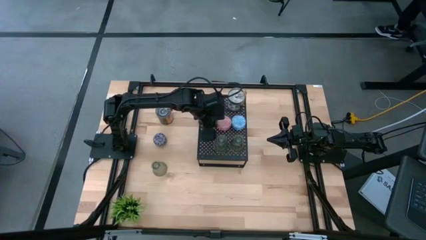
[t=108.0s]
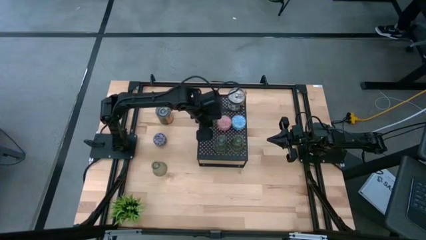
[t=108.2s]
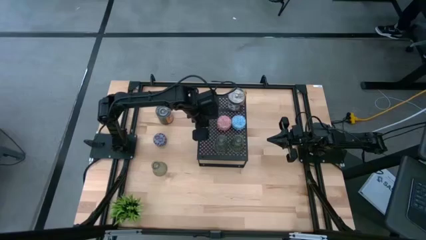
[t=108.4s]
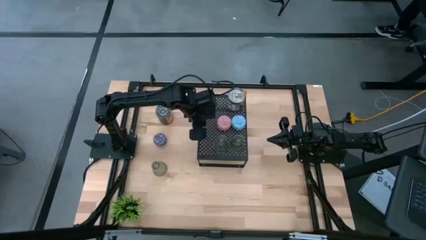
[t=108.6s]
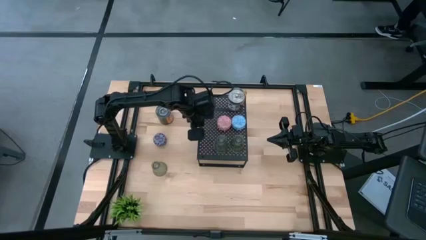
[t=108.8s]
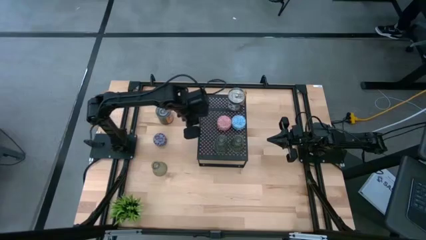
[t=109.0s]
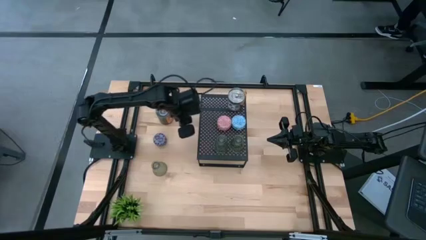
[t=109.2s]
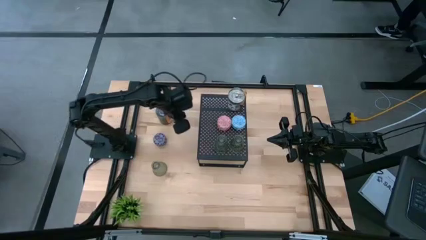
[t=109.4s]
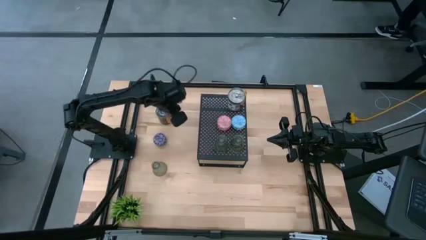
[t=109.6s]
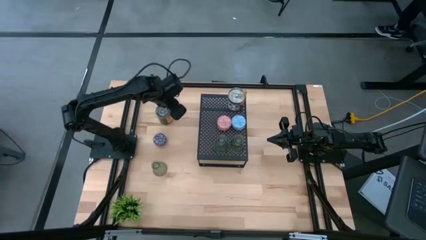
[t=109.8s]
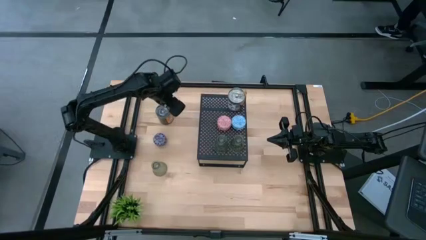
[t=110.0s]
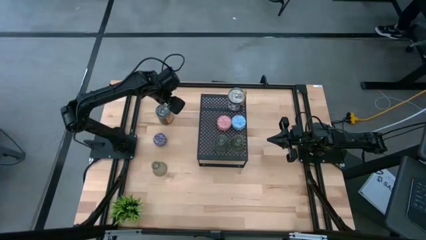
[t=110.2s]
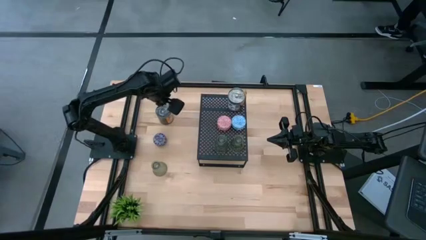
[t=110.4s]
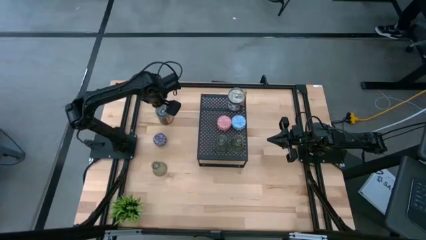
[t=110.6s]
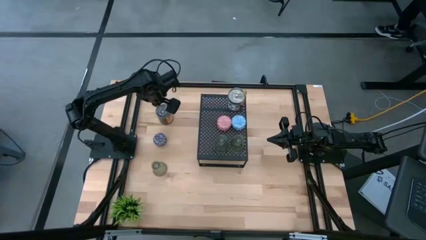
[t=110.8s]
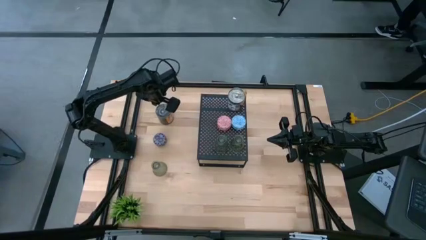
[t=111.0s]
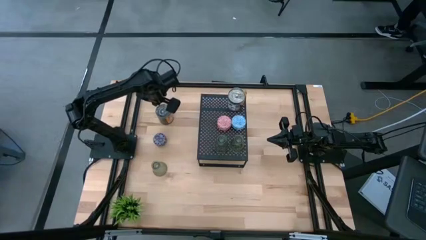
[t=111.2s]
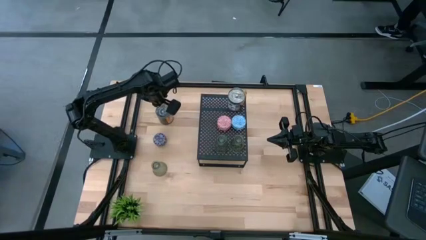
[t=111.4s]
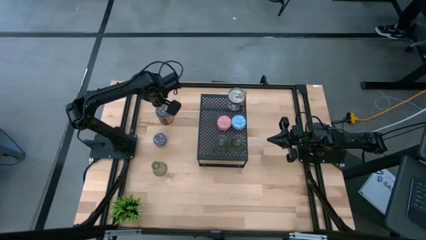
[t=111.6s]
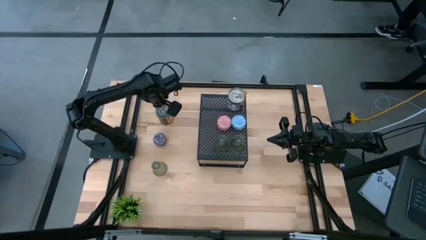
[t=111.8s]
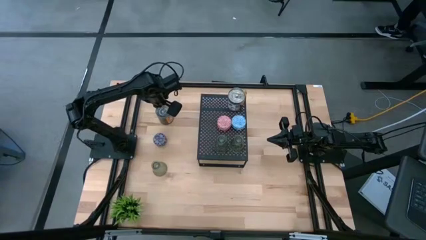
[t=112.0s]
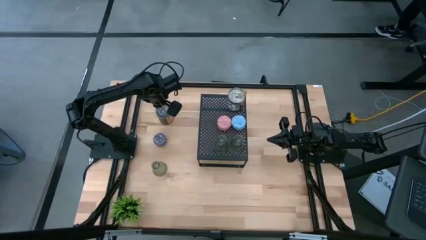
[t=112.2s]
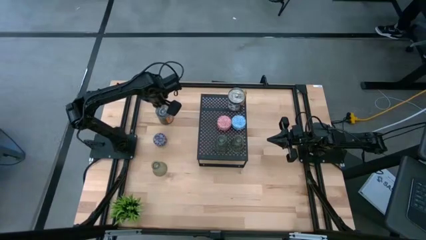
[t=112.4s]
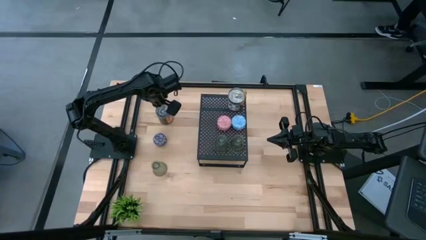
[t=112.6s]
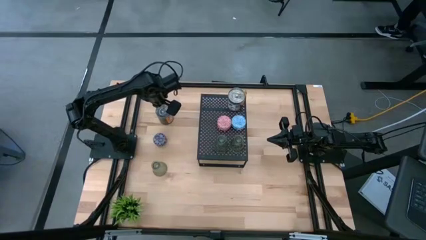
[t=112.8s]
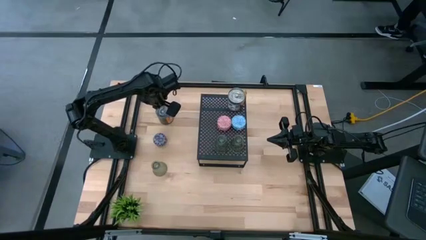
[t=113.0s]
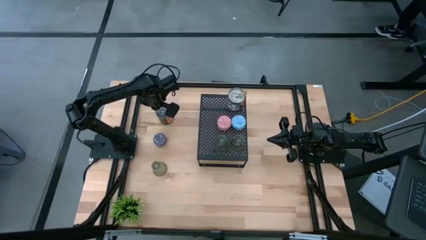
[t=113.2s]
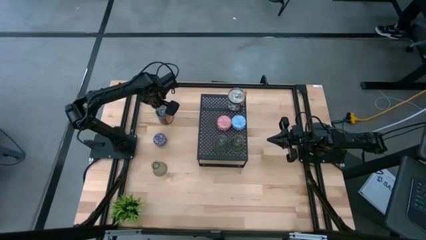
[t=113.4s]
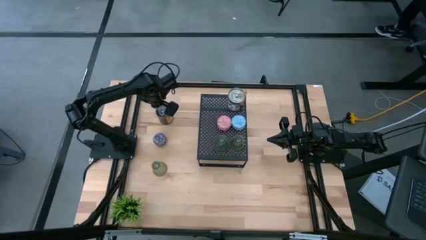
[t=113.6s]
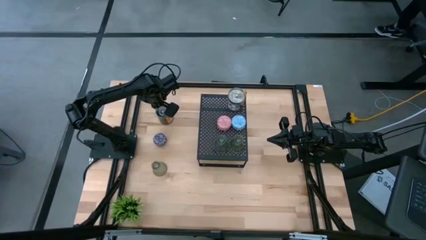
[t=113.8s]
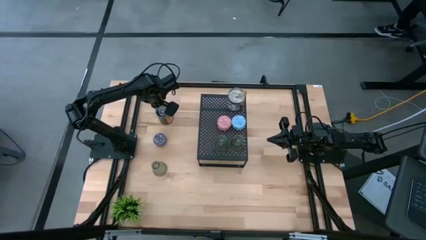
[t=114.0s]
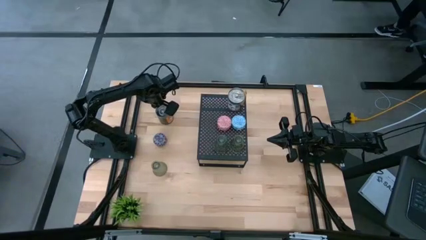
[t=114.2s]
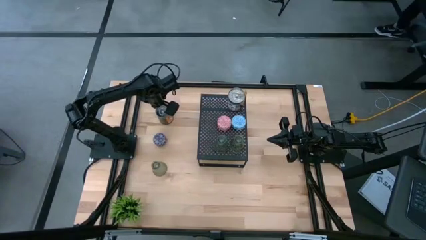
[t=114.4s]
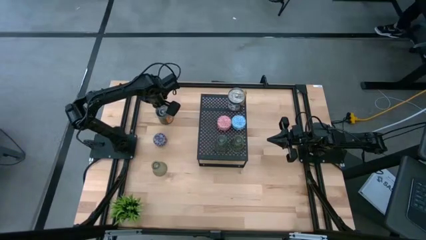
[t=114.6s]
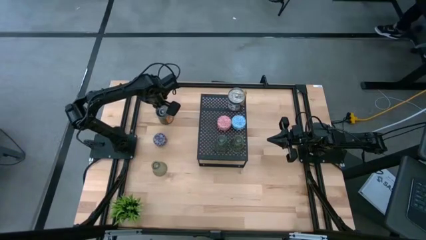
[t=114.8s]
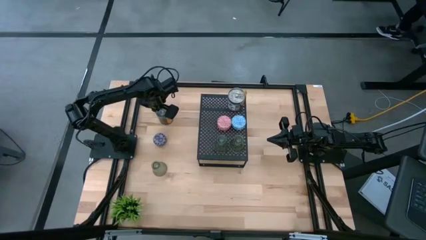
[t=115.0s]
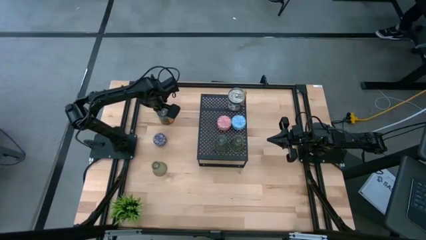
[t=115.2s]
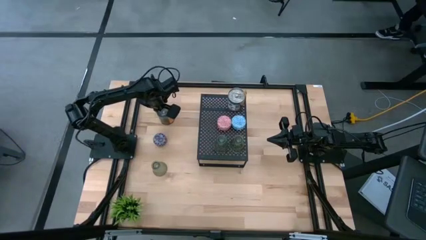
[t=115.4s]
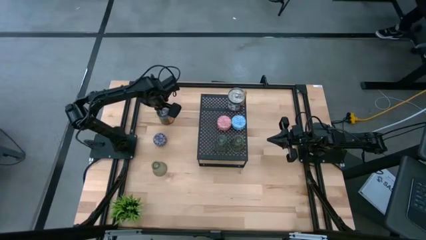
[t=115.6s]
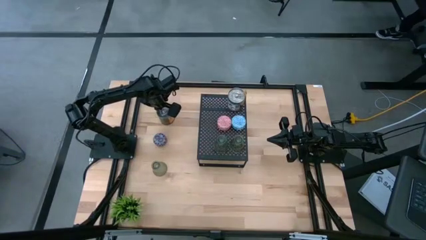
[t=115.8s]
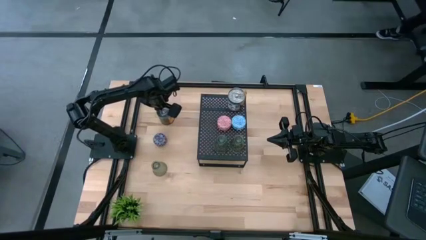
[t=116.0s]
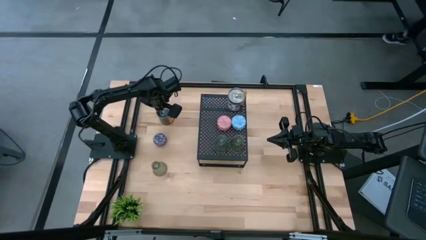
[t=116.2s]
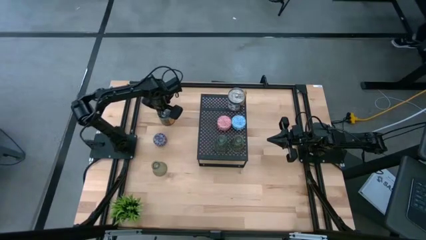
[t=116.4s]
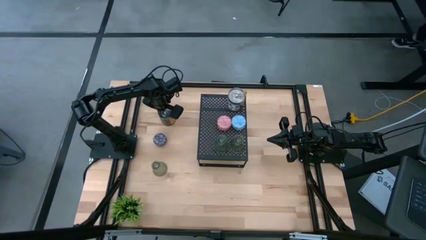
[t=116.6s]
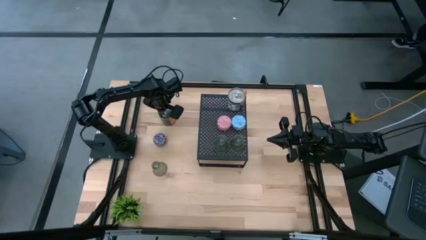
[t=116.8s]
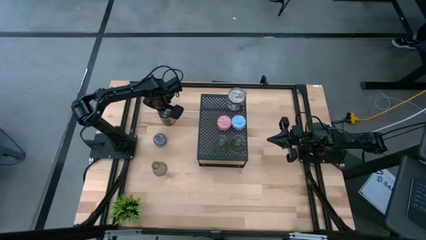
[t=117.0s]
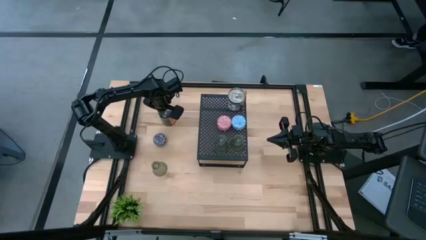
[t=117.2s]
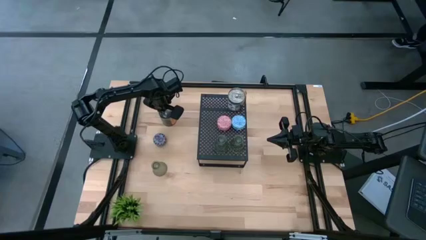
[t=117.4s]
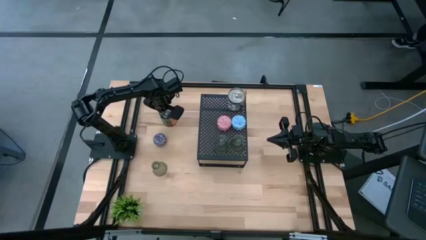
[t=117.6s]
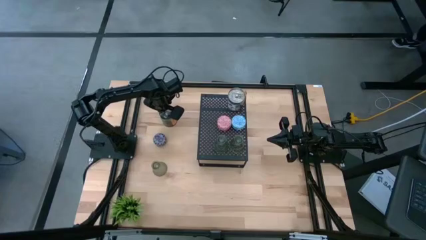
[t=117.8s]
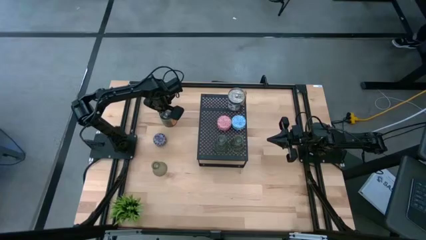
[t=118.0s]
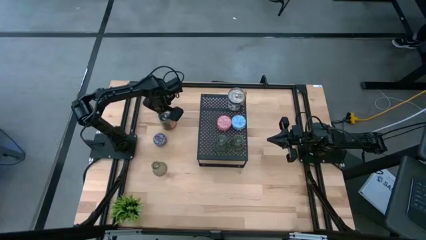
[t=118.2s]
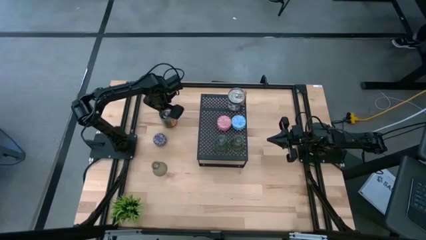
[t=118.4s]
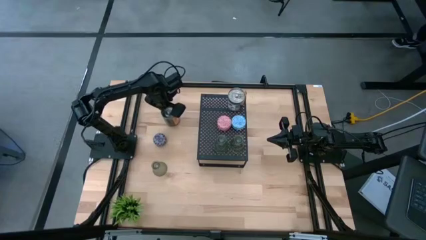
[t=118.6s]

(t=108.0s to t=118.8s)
Task: Pick & Place candle stick holders
Put the orange scented candle on the shelf aligned with the other brown scented candle
